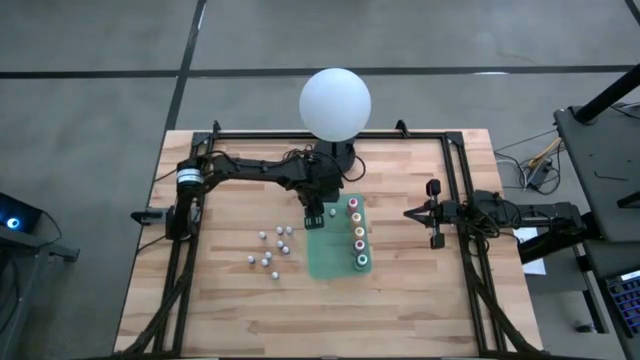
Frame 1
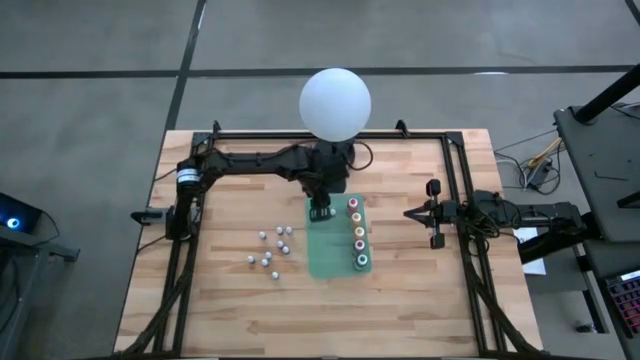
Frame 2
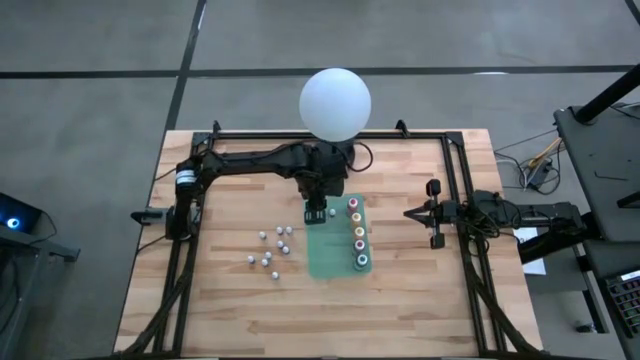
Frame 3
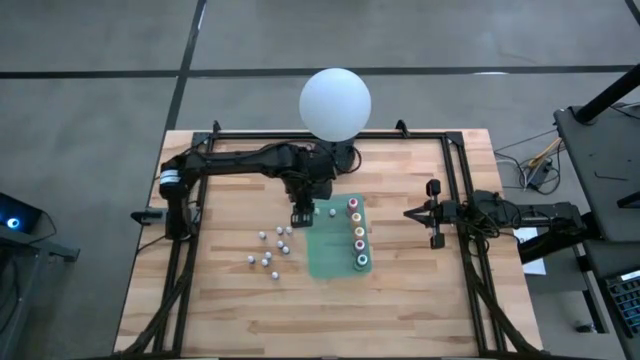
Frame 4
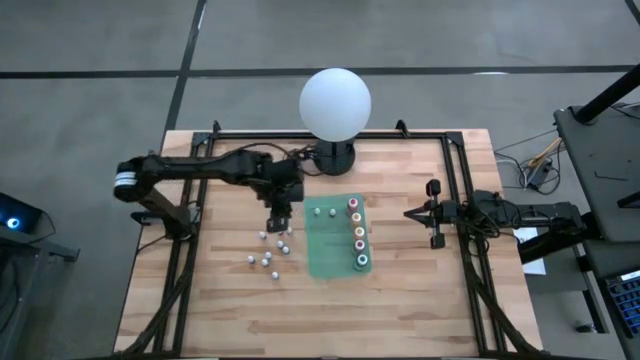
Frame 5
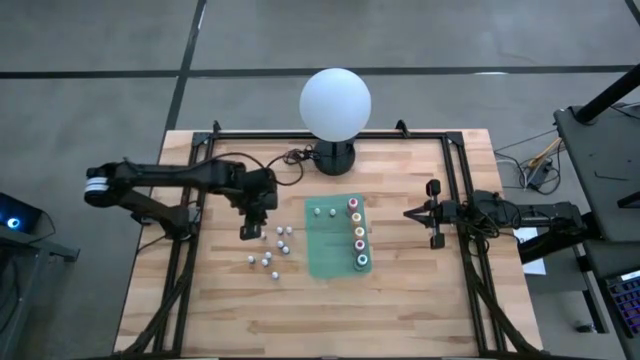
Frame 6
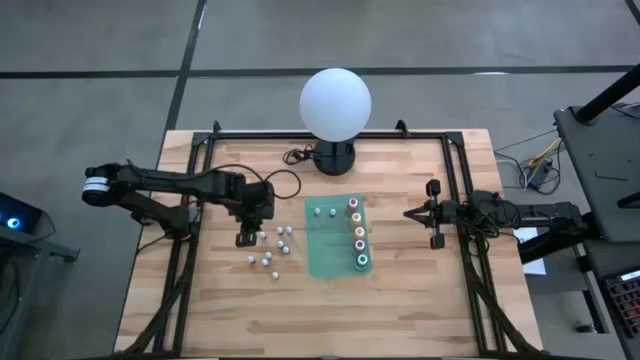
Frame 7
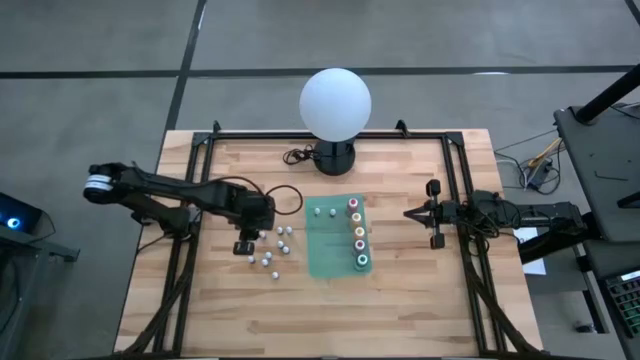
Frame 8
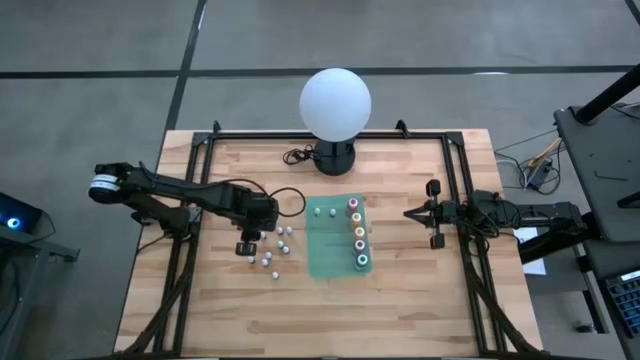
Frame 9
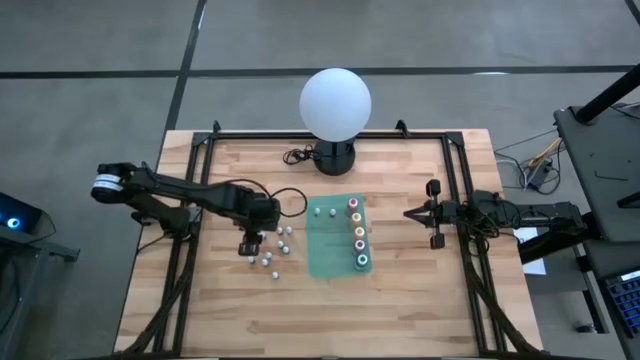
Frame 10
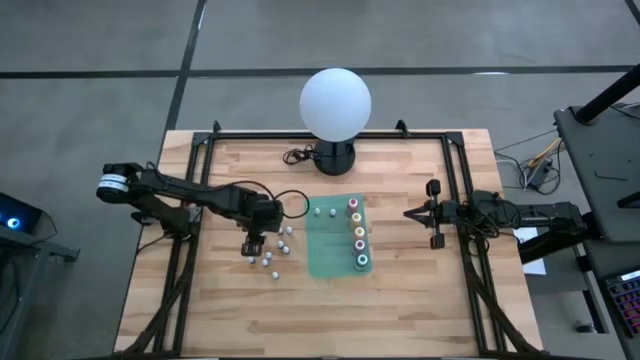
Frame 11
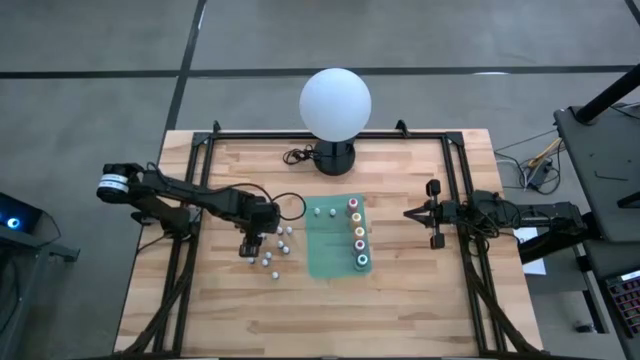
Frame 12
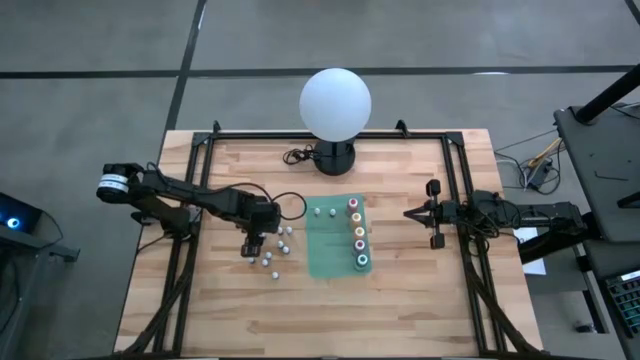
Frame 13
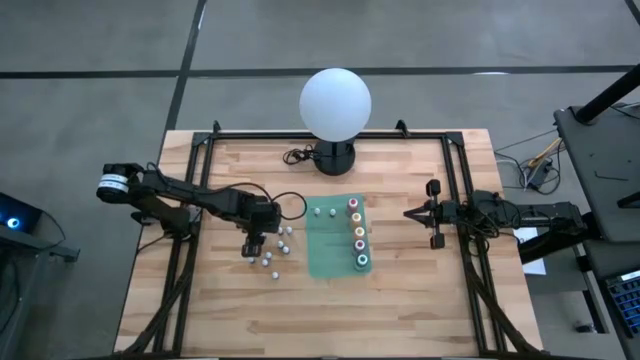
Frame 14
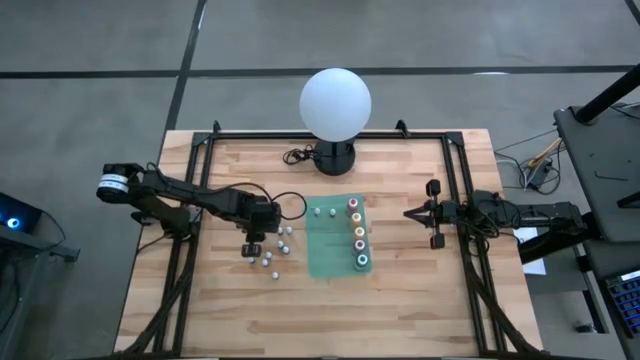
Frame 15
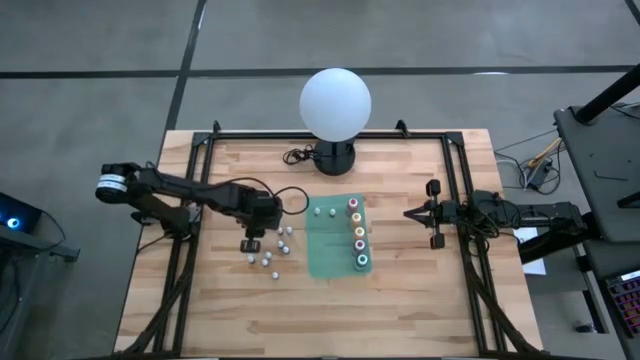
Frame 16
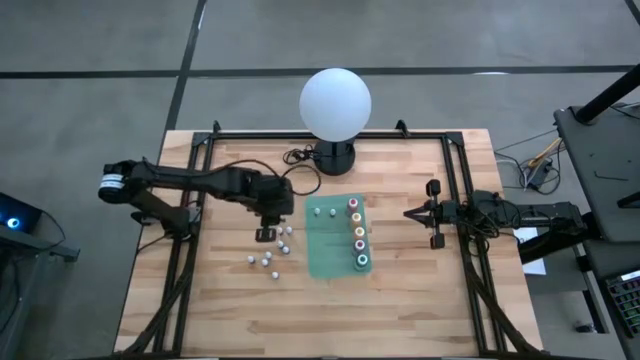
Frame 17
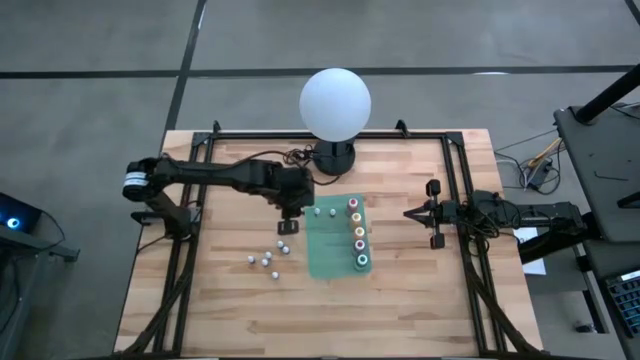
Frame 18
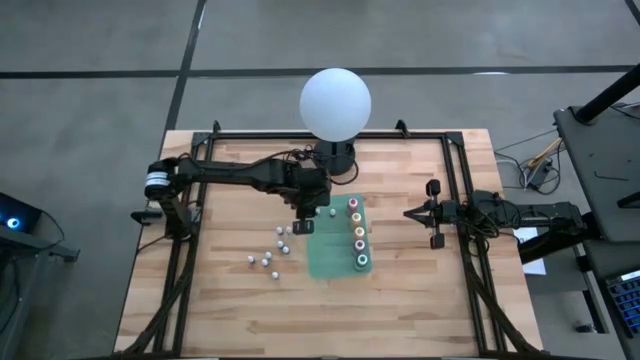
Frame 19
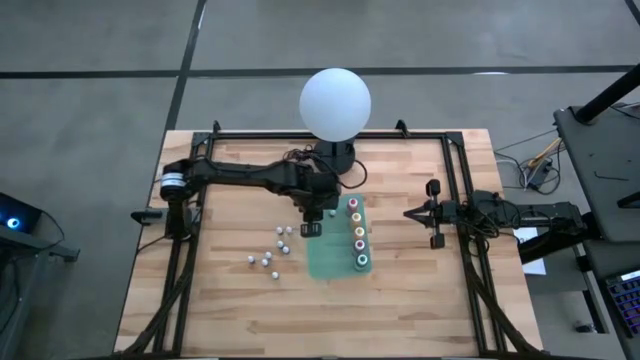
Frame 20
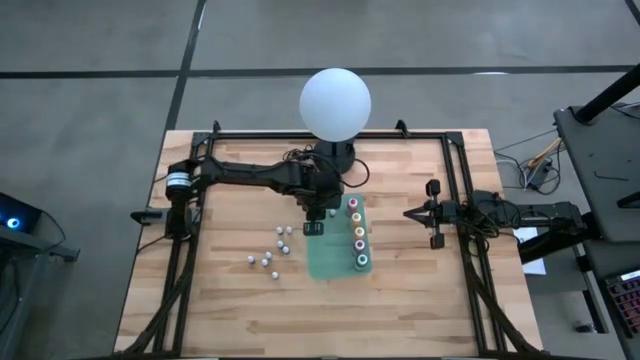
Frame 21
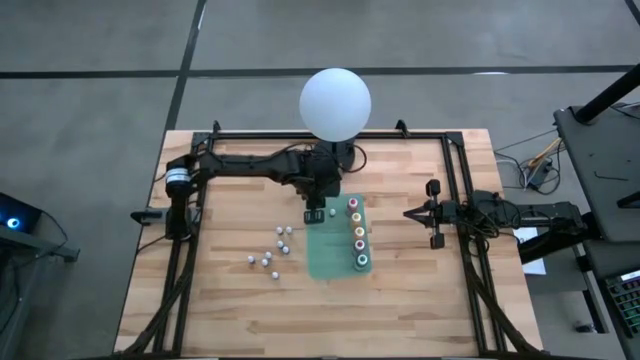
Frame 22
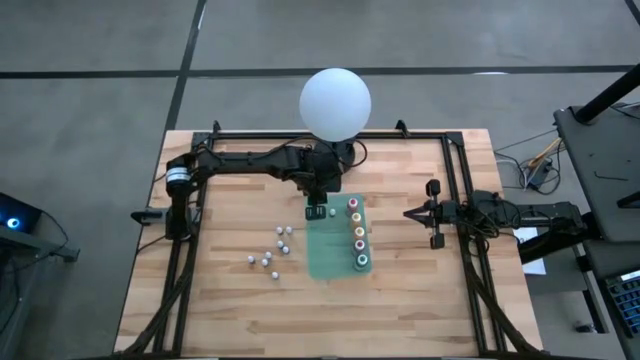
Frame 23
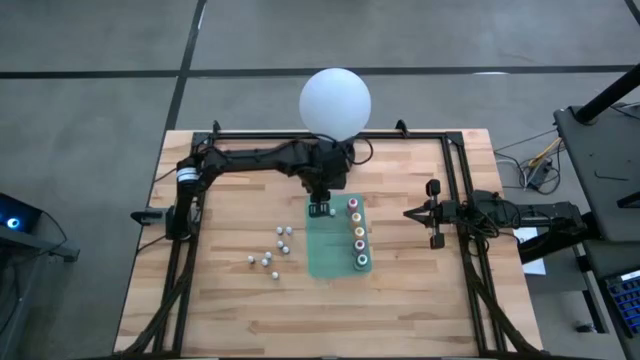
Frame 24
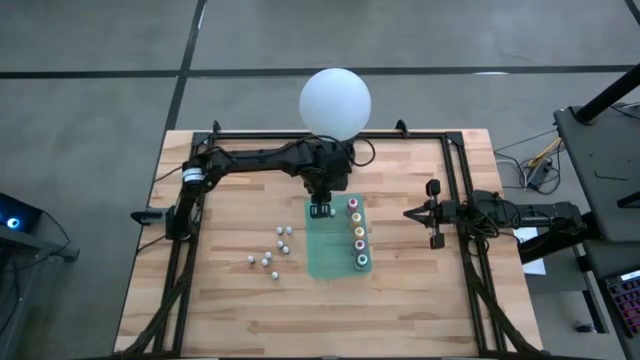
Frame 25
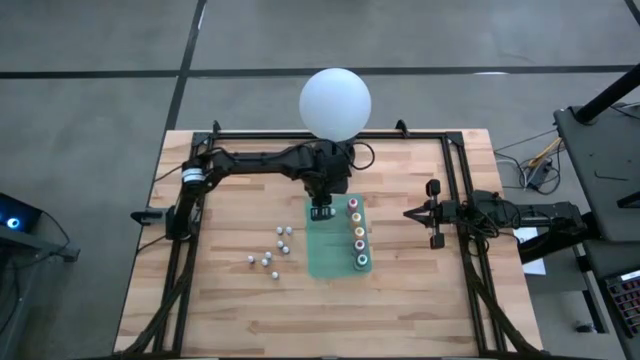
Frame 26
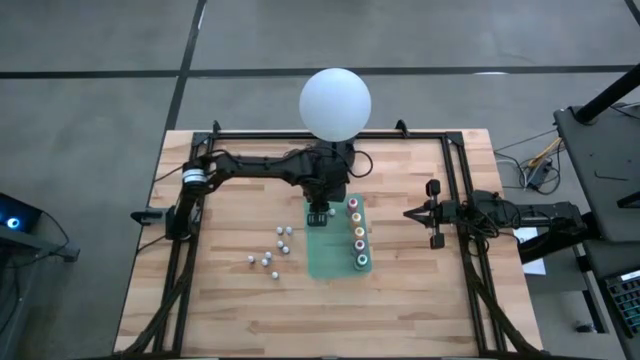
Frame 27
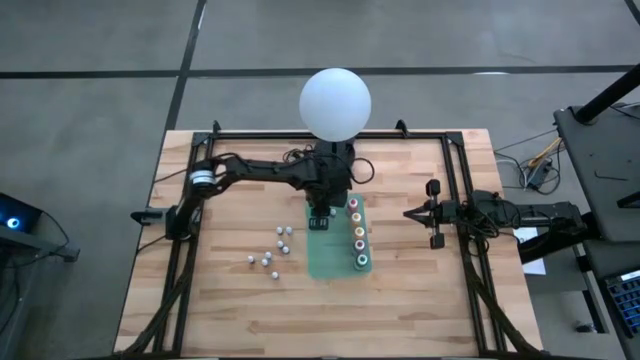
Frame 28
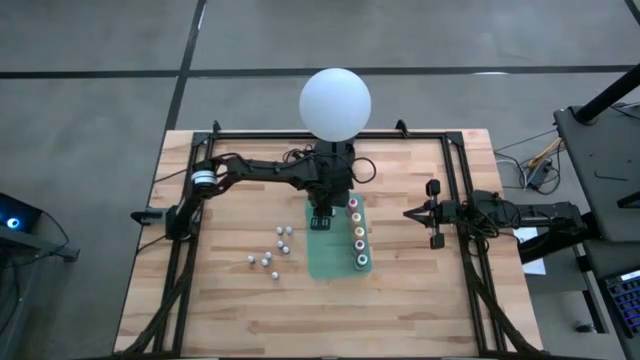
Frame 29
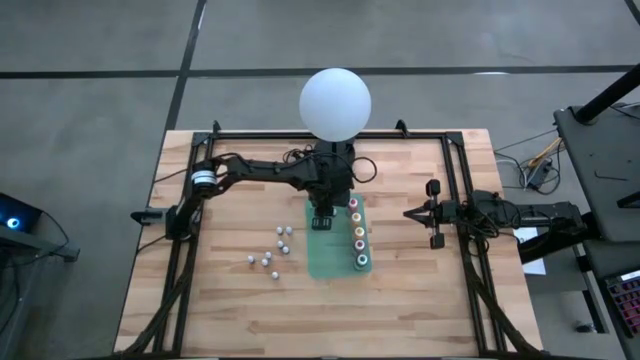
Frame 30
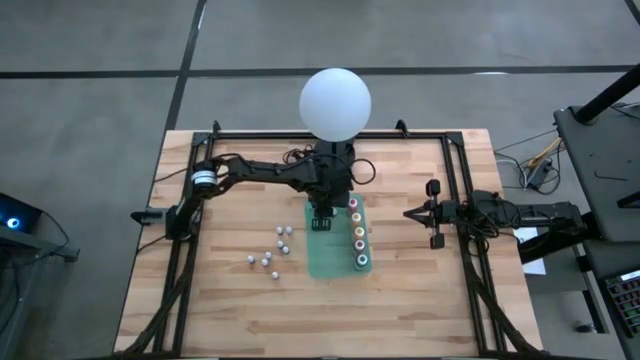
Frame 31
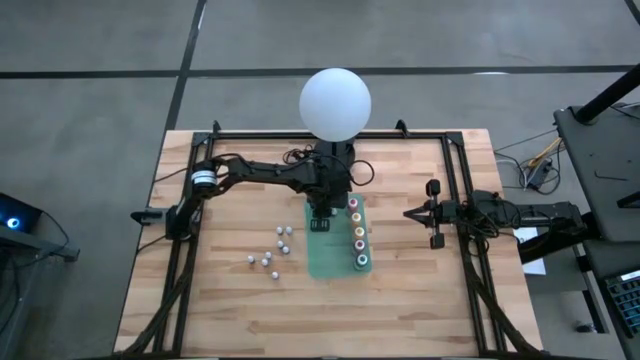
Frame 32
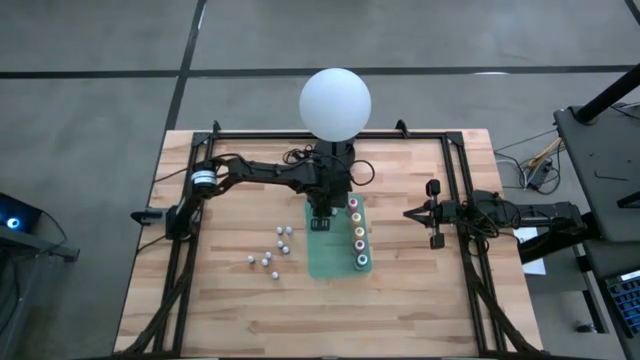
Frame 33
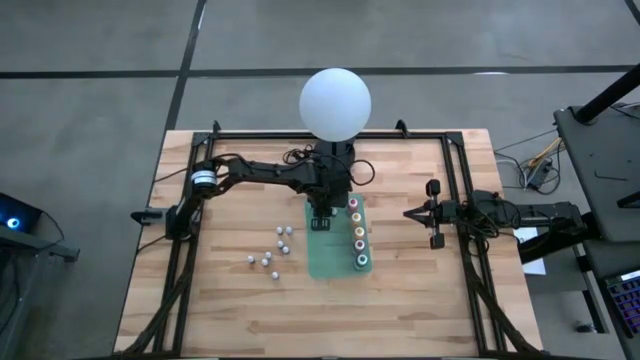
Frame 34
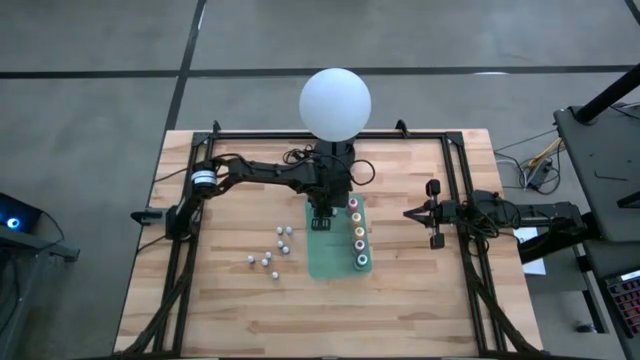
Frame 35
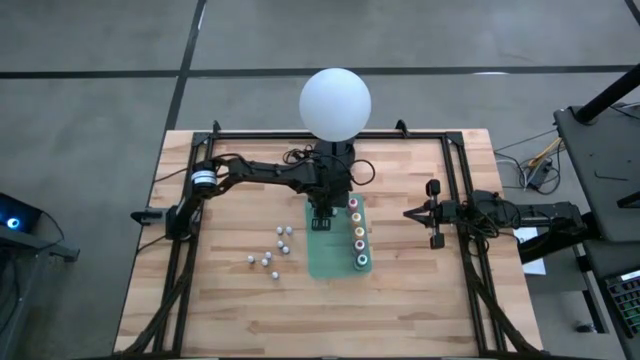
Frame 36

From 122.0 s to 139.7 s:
Task: Pick & Place food coloring
Put the left small red food coloring bottle into the green bin

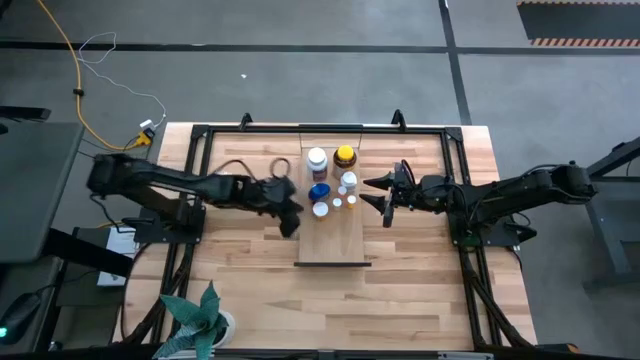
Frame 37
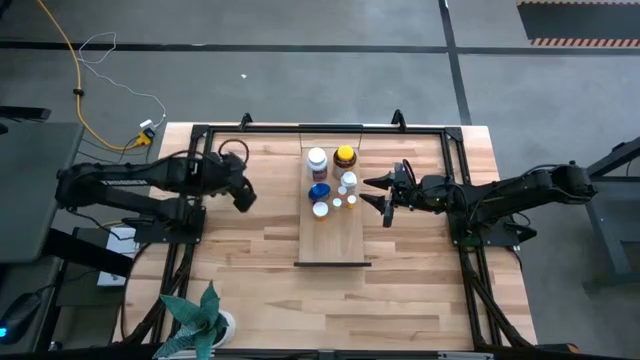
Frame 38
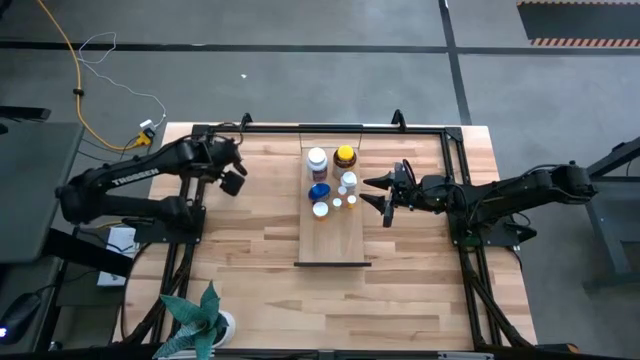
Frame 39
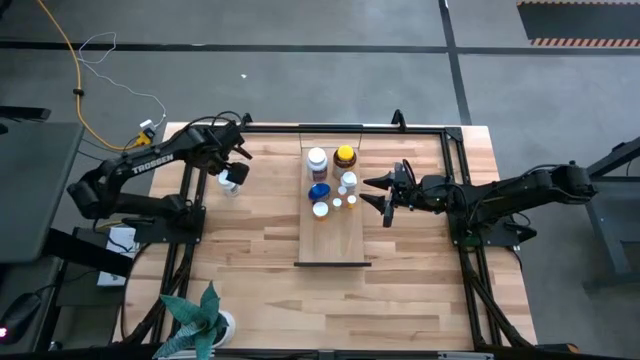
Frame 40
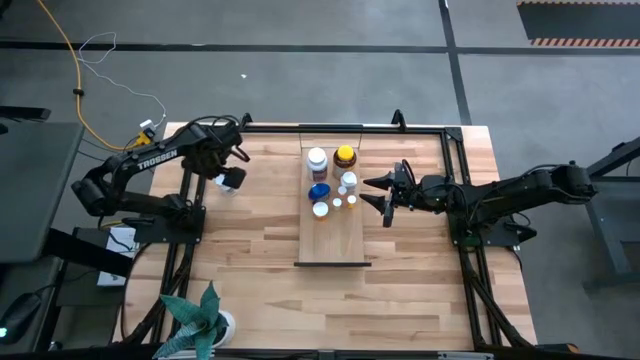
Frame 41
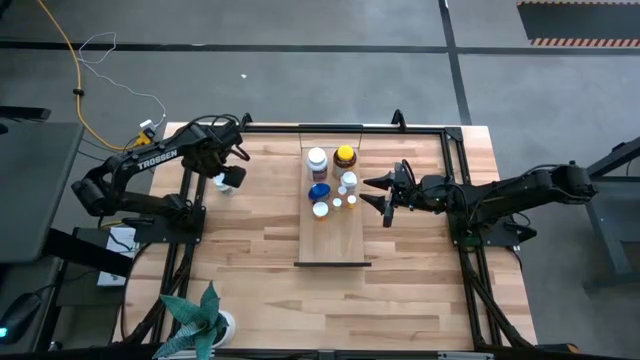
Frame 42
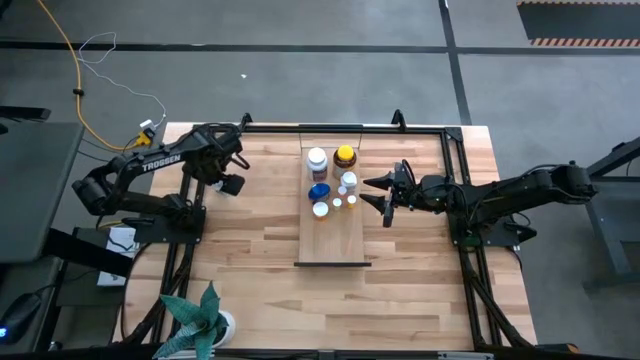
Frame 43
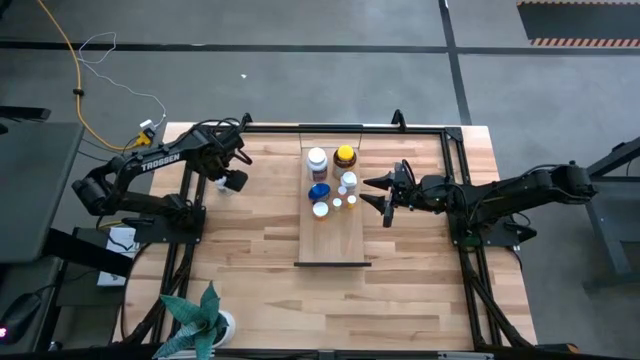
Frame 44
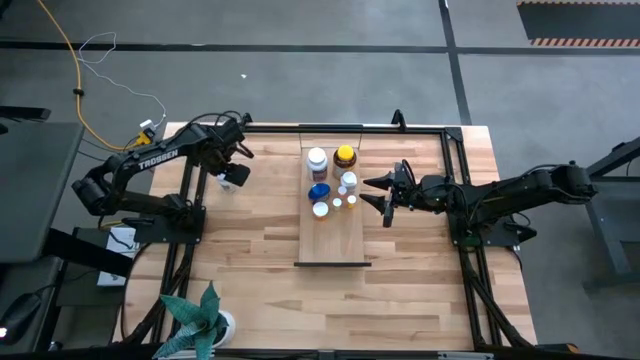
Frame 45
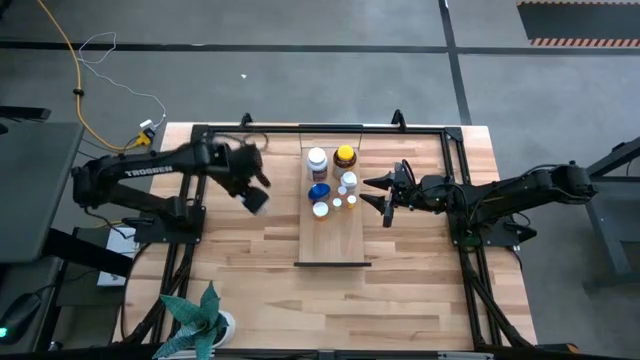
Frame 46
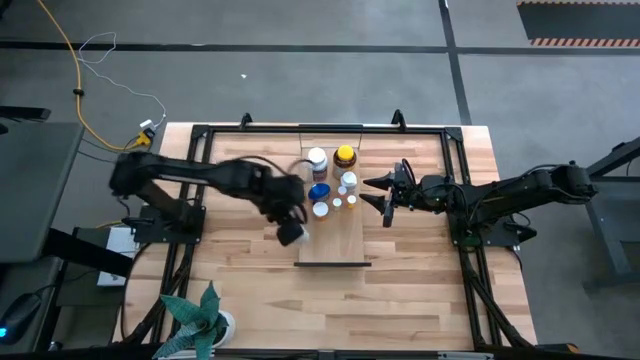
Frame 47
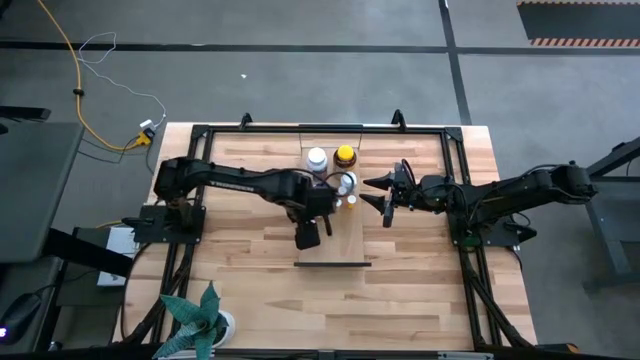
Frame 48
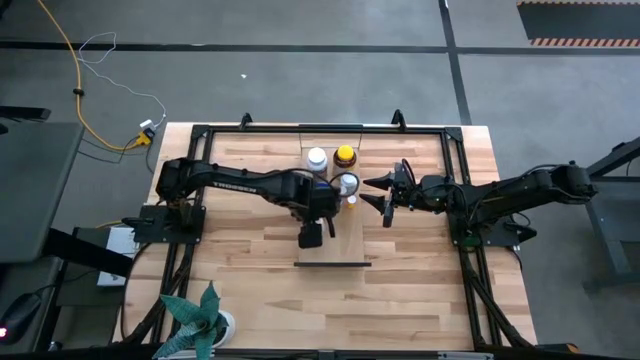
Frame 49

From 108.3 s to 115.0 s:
Task: Pick and place medicine bottles onto shelf by color
Put the white green pill bottle on the shelf
